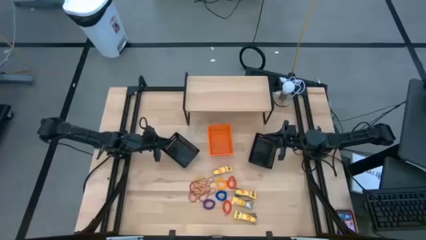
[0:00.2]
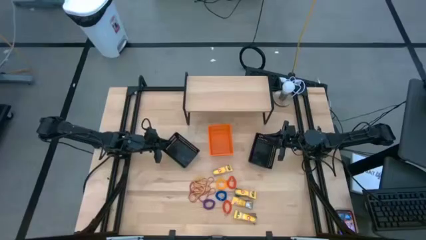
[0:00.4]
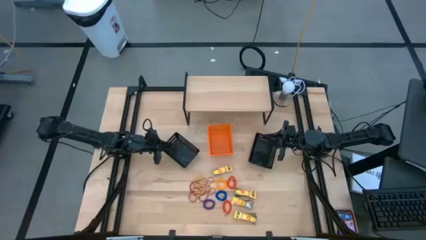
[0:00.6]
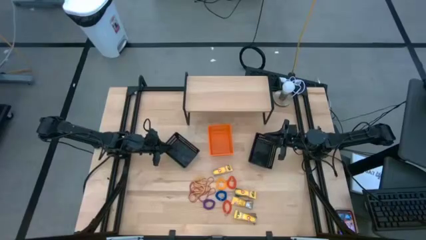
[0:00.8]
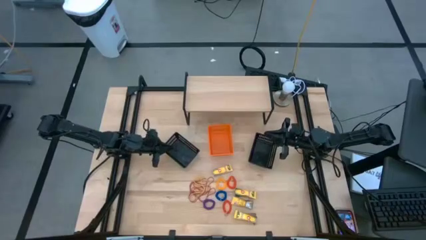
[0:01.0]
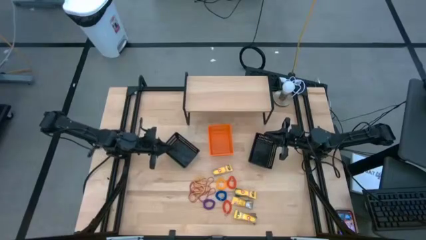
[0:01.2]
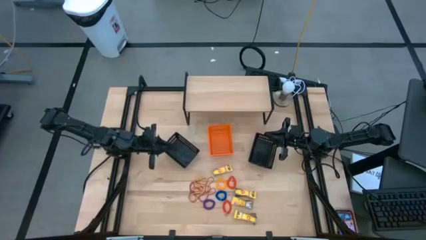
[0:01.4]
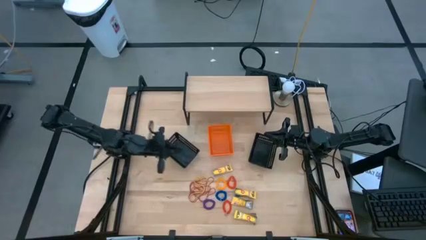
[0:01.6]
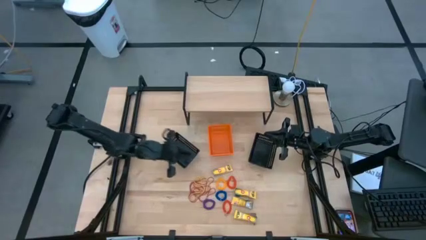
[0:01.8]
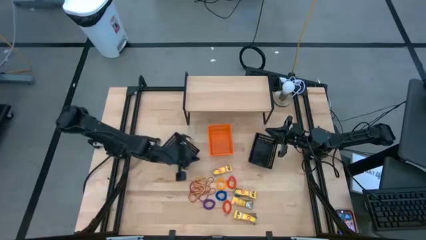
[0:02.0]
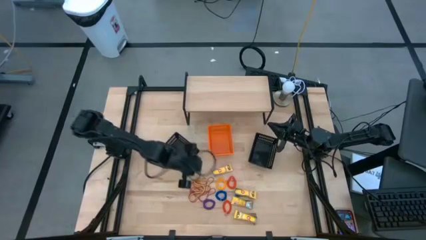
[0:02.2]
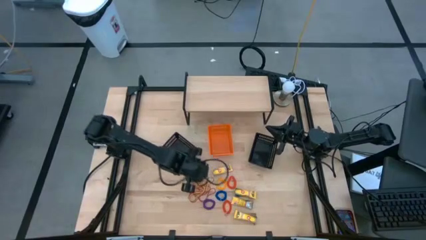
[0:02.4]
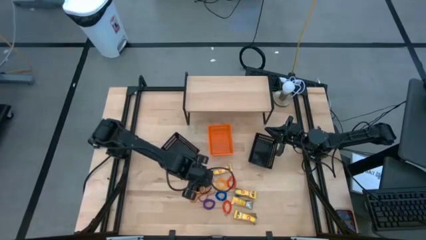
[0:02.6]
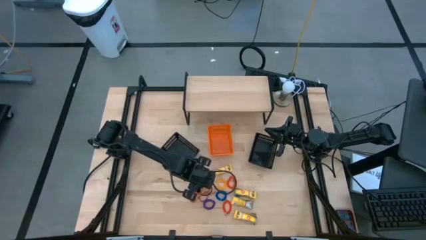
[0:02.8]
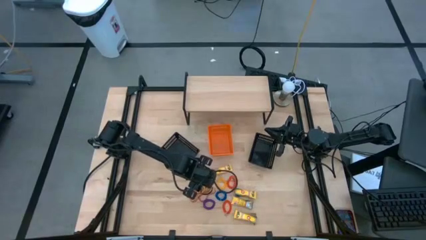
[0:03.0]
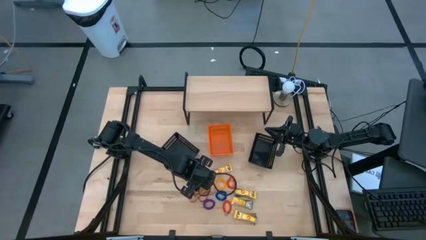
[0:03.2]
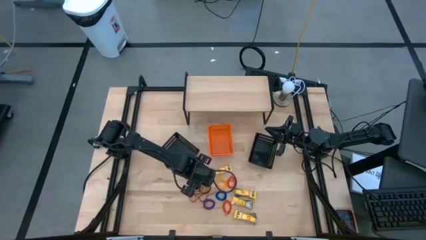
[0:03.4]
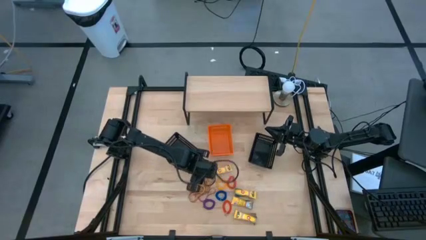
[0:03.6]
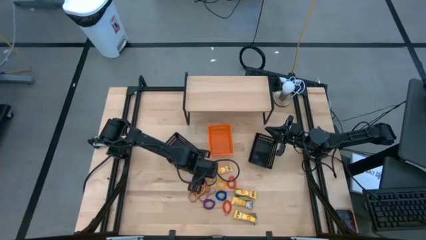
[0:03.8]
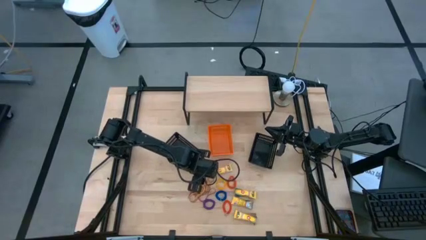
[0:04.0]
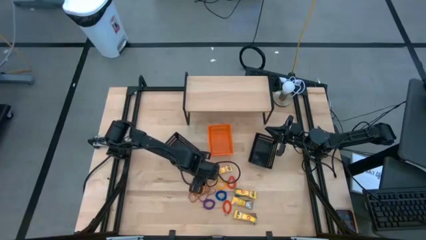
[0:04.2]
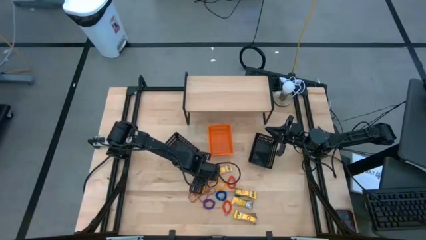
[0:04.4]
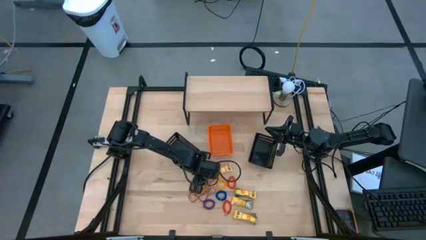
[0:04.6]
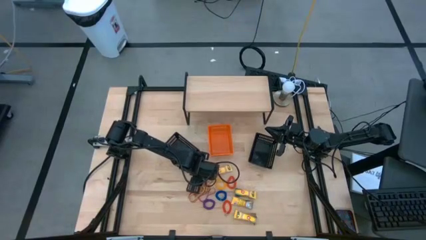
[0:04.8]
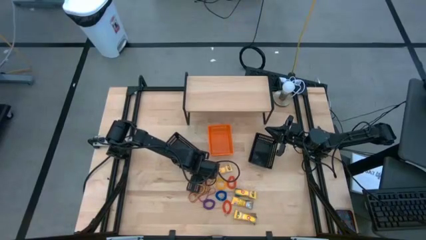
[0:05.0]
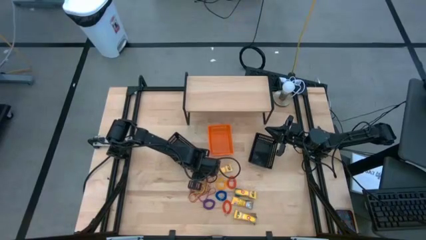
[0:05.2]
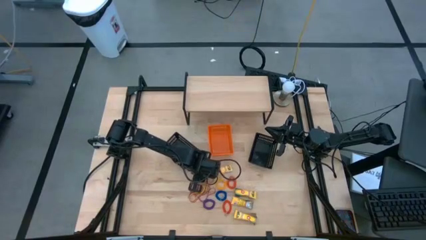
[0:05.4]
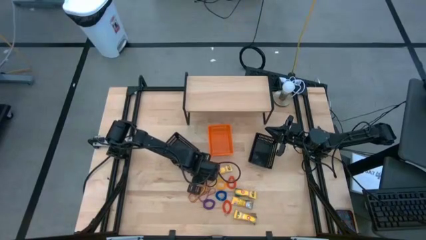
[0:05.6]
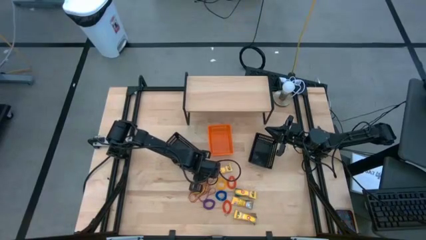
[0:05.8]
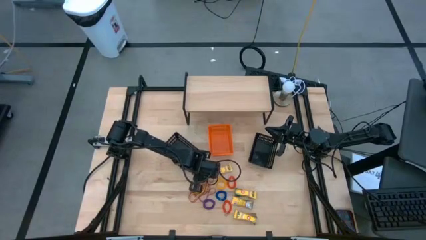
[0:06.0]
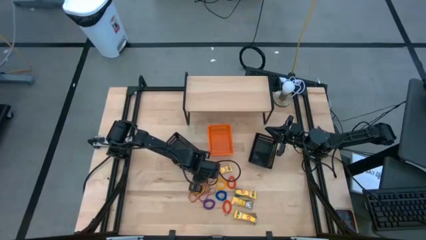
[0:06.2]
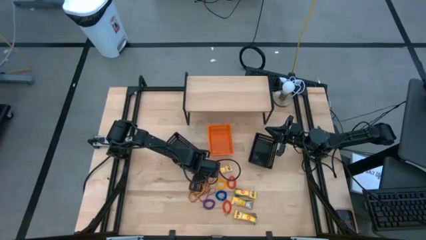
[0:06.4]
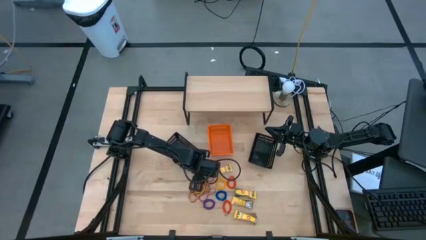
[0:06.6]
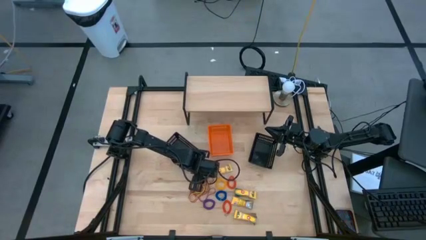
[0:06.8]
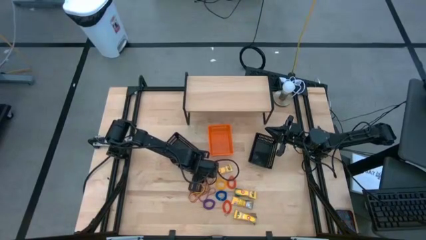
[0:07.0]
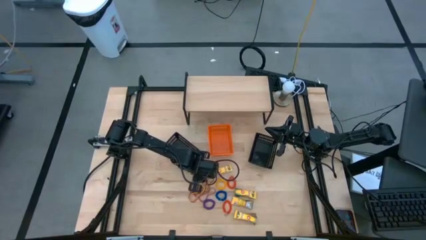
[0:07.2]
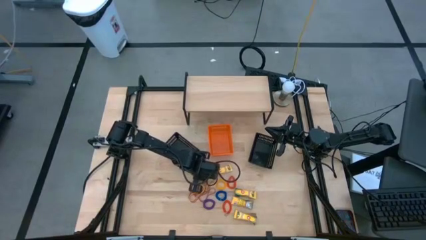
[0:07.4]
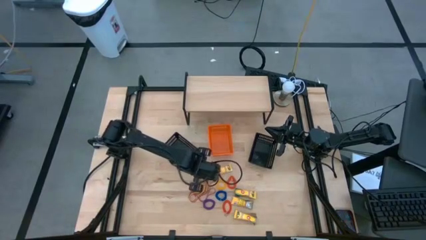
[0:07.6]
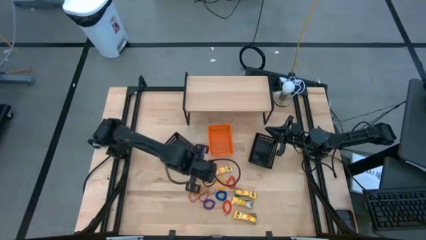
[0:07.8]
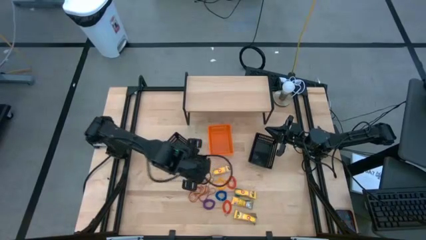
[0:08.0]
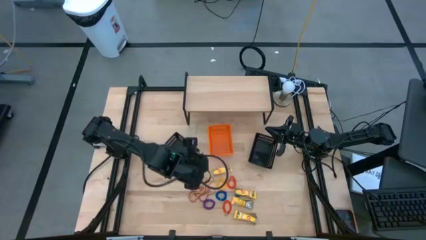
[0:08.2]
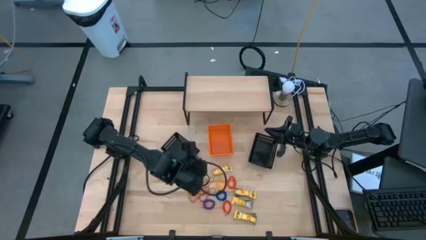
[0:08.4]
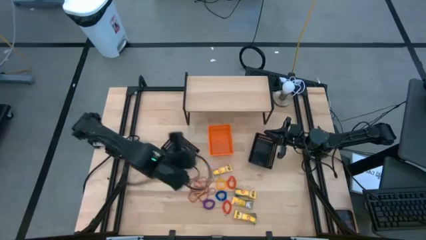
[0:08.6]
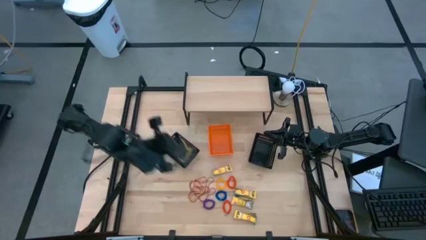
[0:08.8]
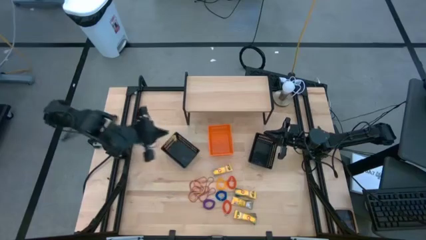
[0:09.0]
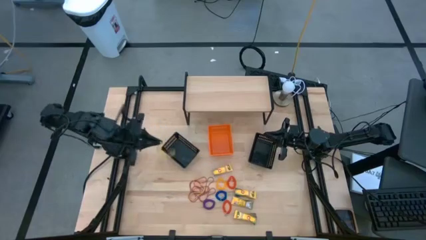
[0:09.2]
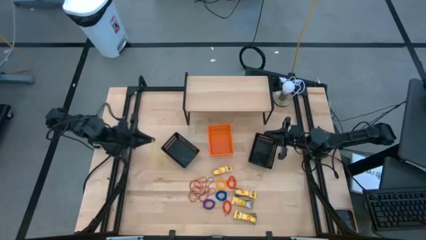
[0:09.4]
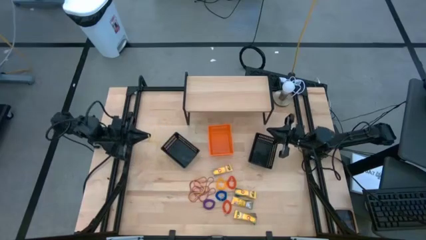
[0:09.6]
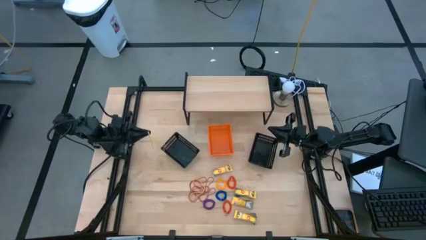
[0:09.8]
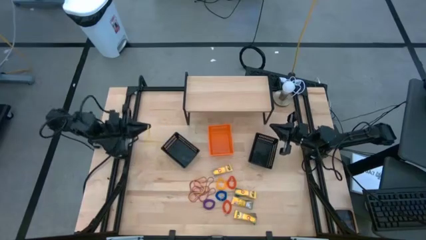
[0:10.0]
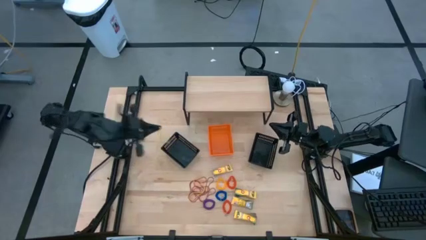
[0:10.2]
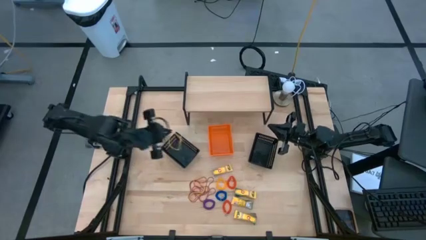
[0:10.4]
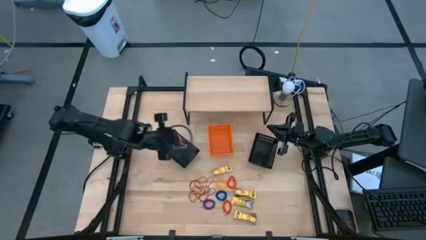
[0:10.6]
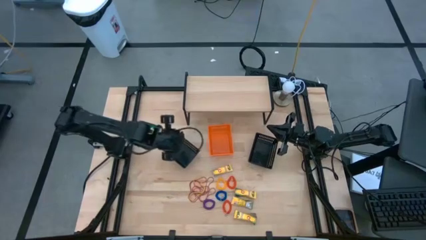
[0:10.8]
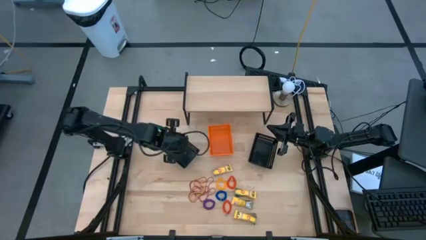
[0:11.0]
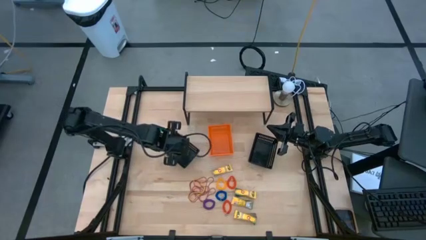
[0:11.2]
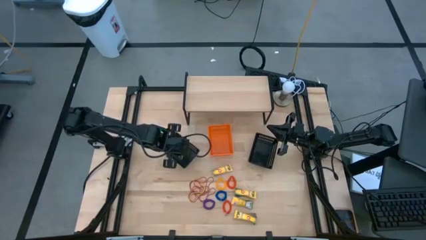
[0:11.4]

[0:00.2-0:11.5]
Task: Pick & Place Office Desk Supplies
Put the yellow rubber band into the left black bin

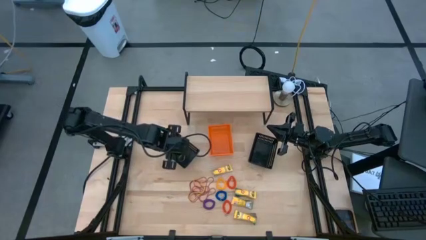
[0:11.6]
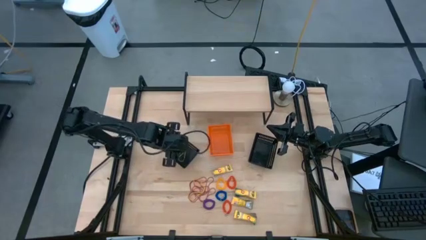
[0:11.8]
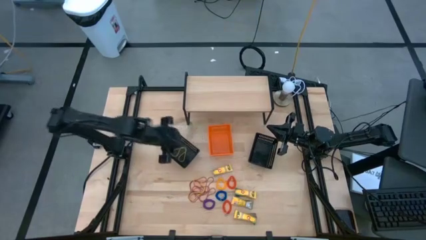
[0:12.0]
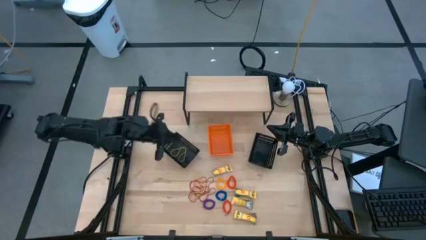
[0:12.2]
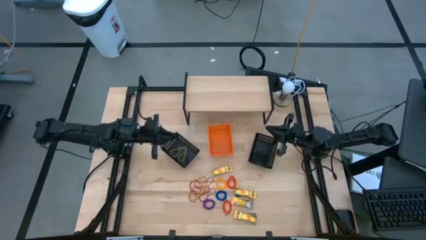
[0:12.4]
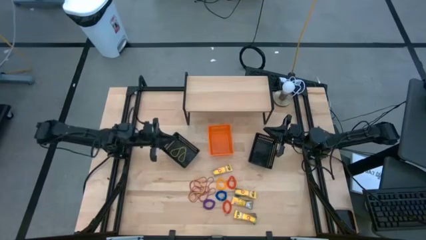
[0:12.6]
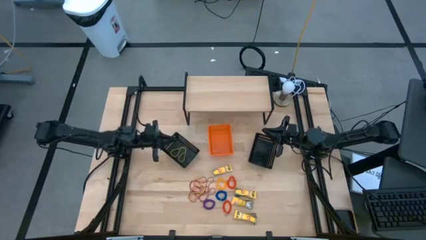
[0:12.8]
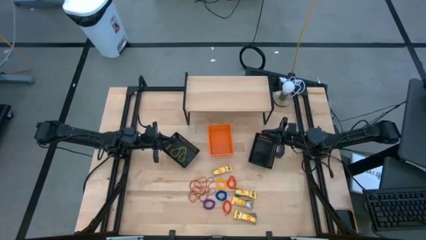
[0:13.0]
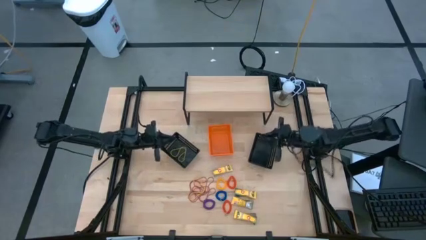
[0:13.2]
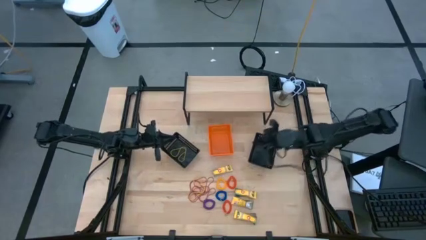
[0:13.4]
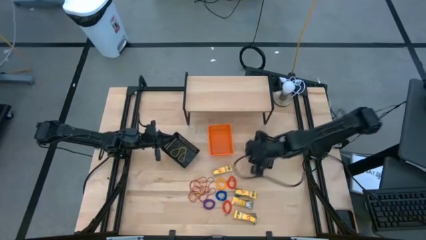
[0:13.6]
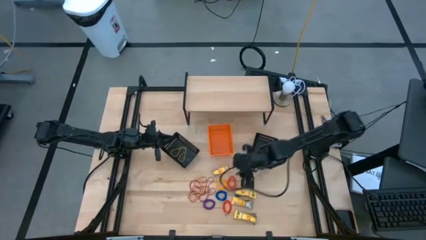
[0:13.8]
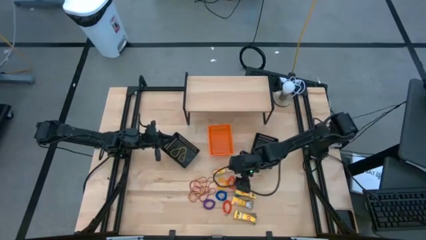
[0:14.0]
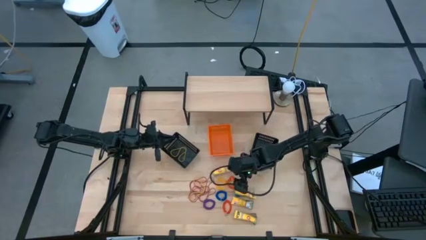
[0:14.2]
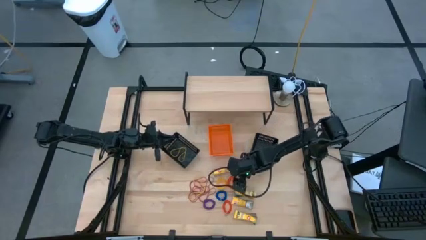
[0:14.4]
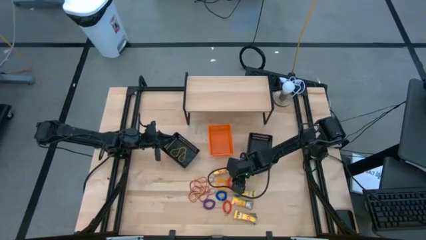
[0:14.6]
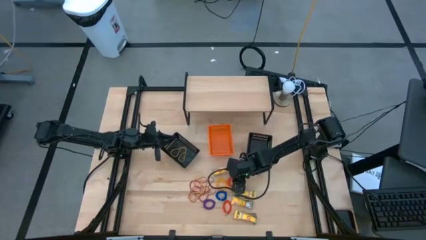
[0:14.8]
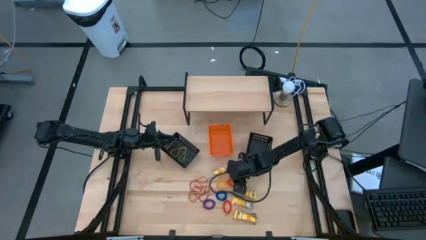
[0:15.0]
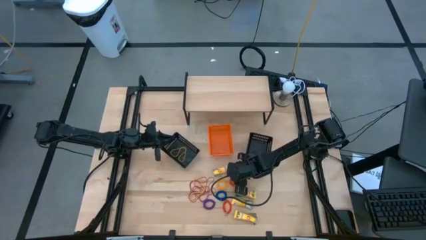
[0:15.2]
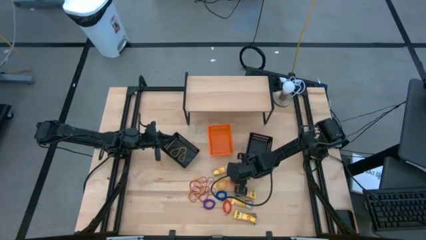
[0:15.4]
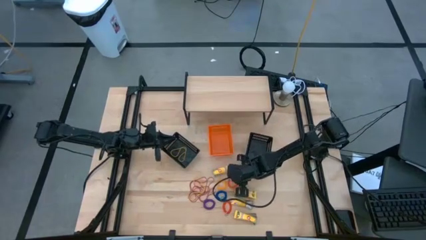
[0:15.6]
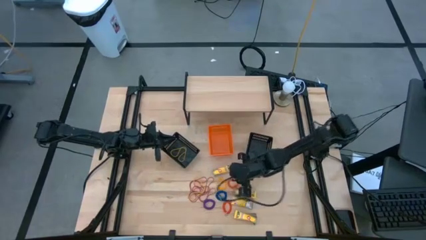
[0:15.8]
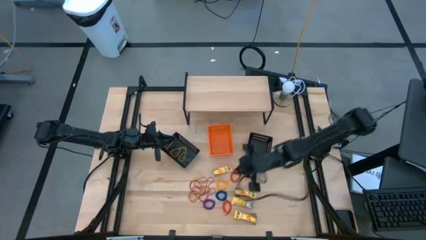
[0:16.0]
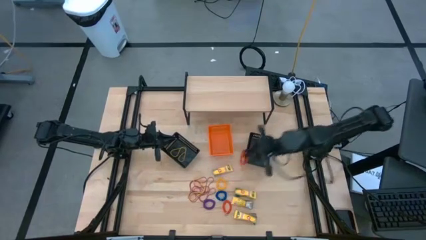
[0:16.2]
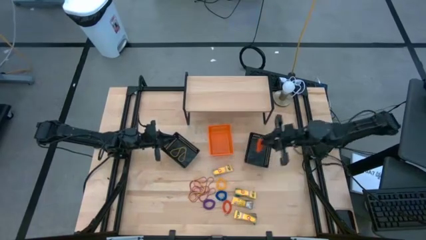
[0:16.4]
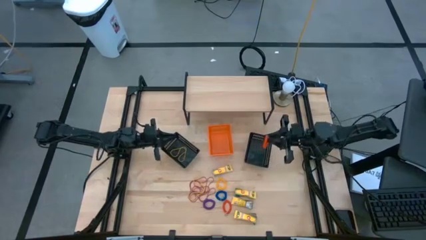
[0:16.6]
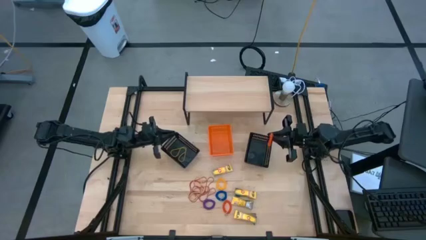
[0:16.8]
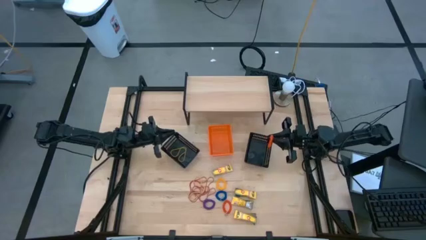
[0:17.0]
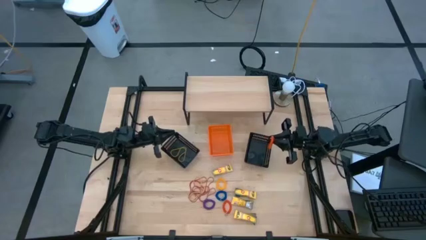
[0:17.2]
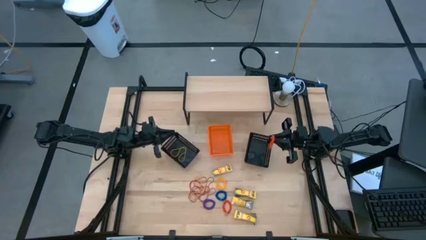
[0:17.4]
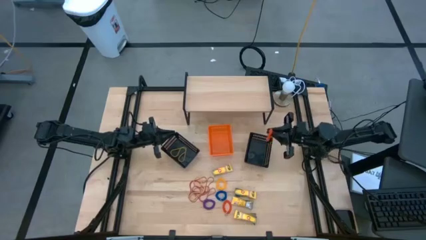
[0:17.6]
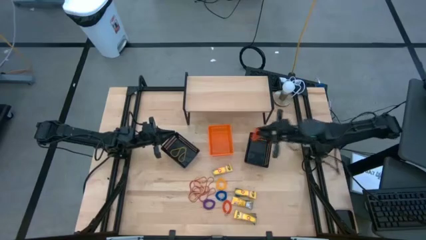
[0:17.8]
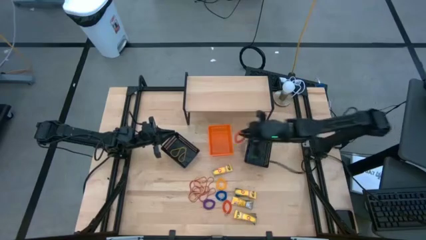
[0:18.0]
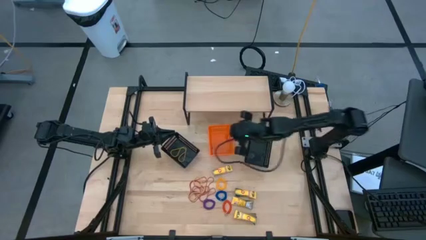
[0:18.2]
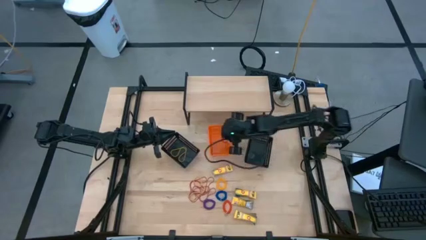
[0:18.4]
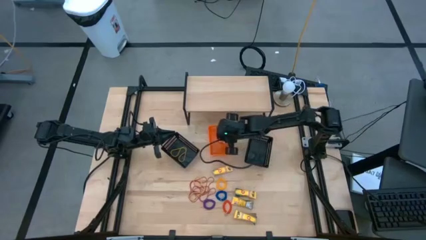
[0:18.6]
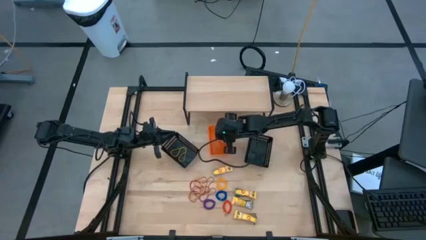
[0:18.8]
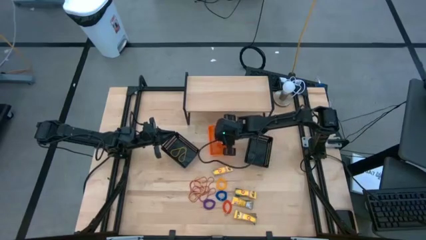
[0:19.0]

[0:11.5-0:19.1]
Put the orange spring keychain into the orange bin
